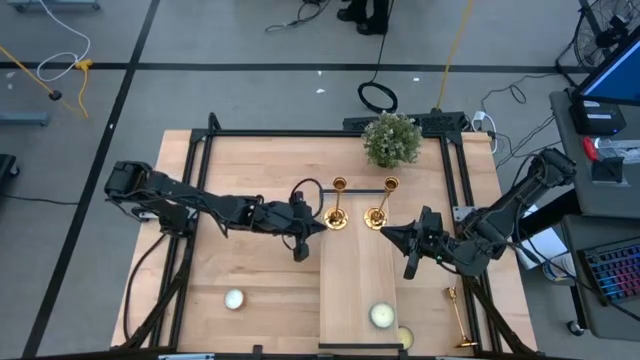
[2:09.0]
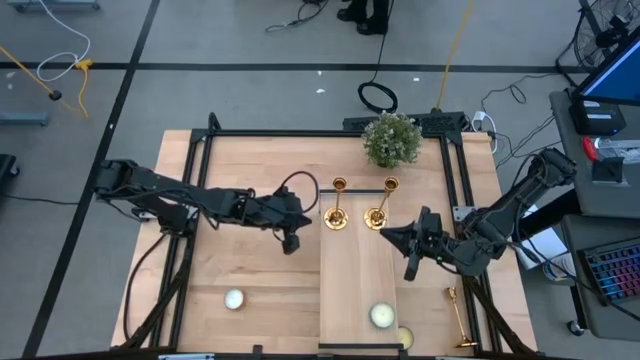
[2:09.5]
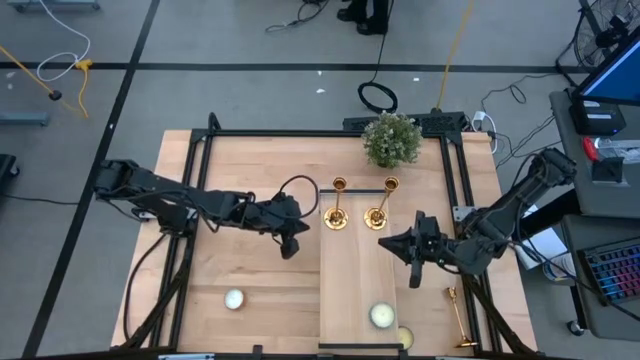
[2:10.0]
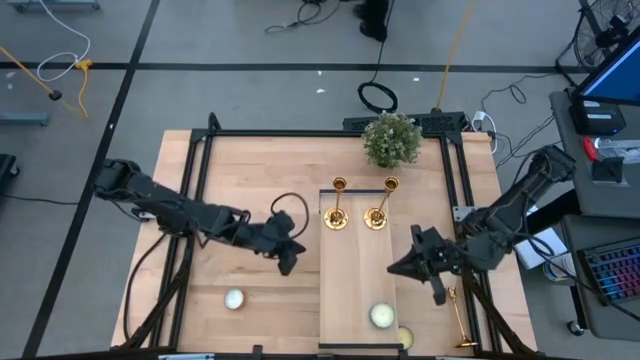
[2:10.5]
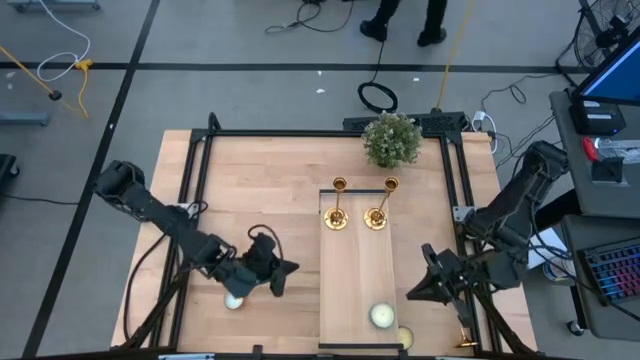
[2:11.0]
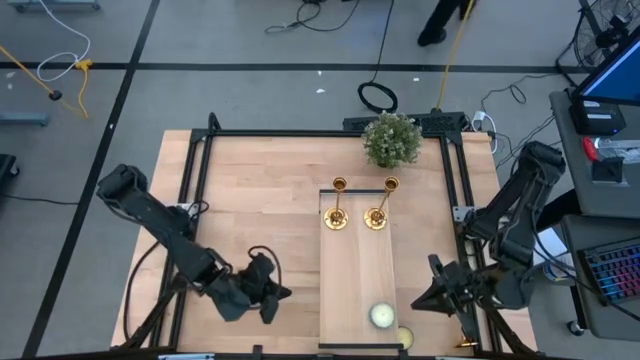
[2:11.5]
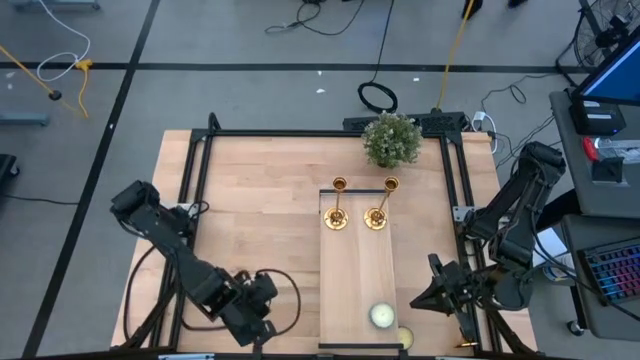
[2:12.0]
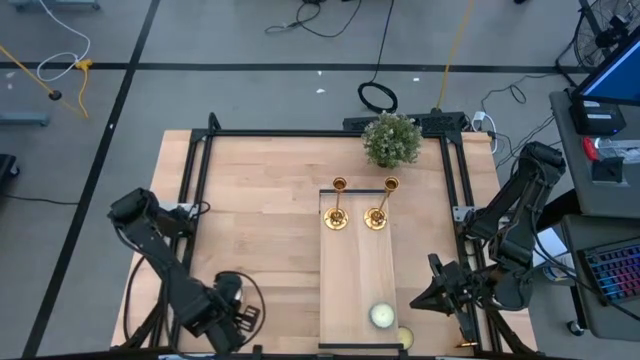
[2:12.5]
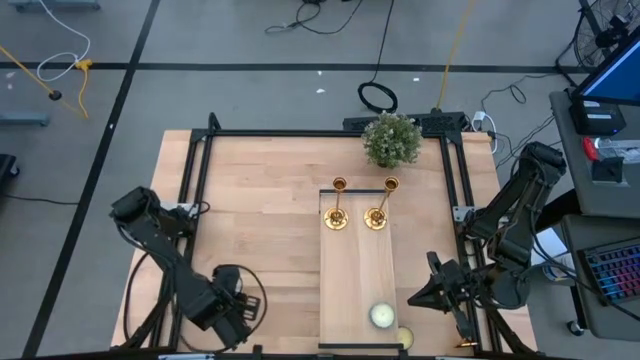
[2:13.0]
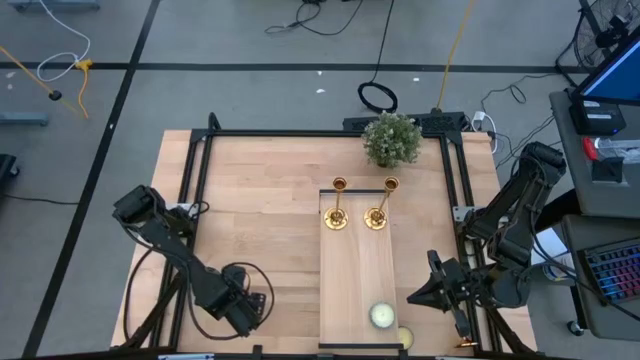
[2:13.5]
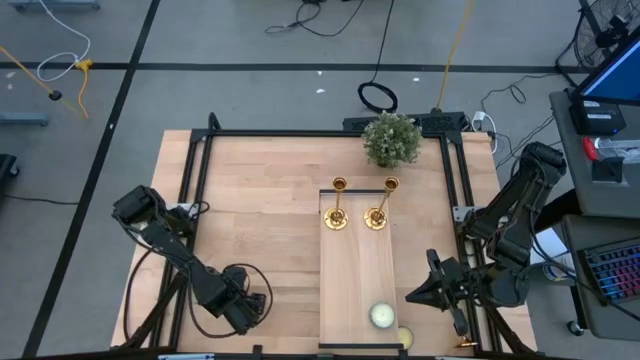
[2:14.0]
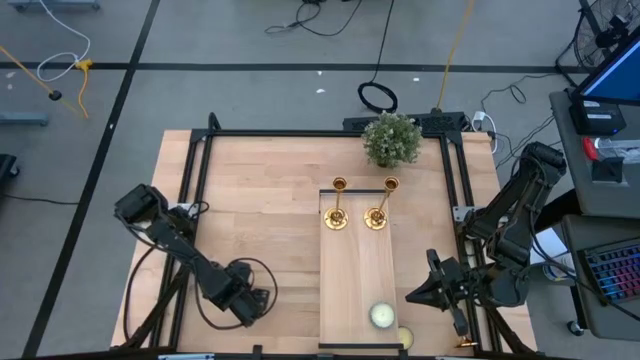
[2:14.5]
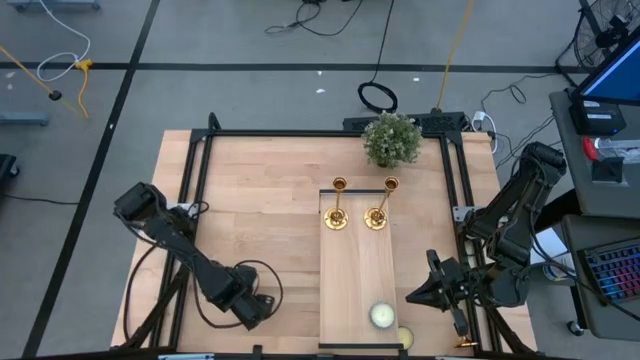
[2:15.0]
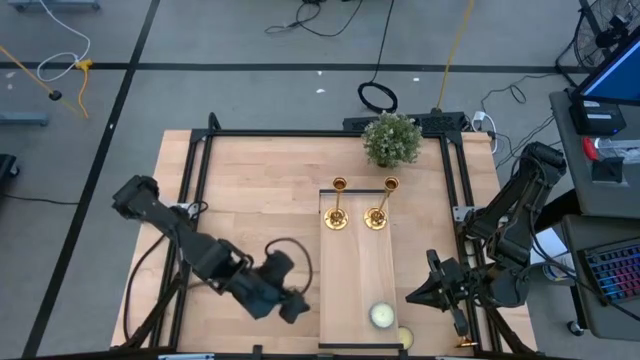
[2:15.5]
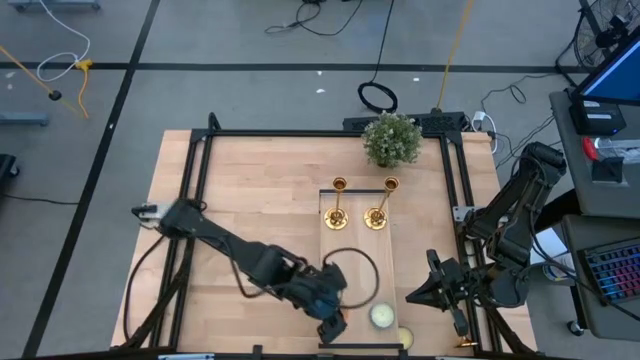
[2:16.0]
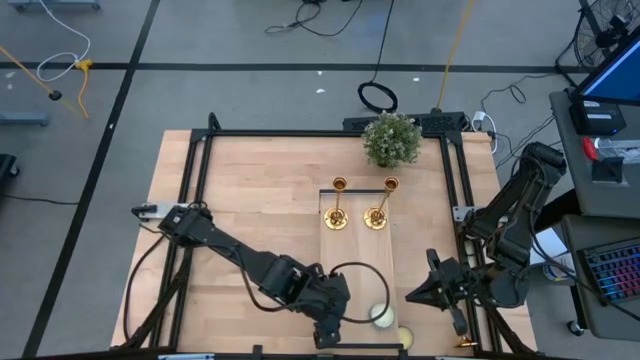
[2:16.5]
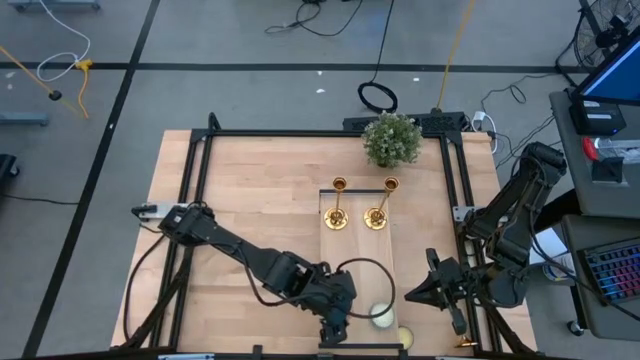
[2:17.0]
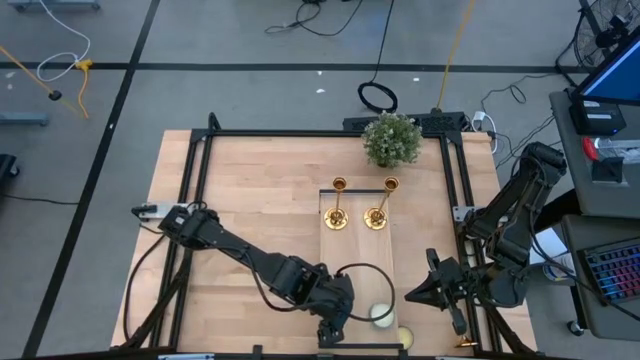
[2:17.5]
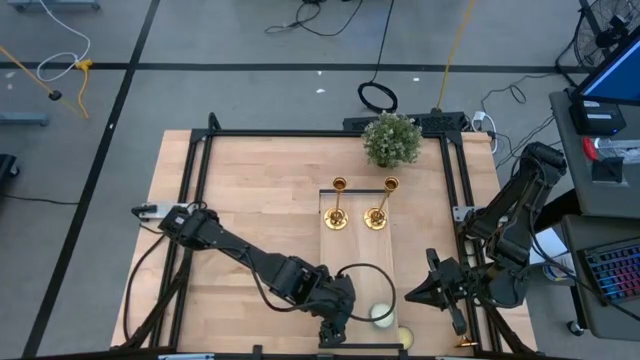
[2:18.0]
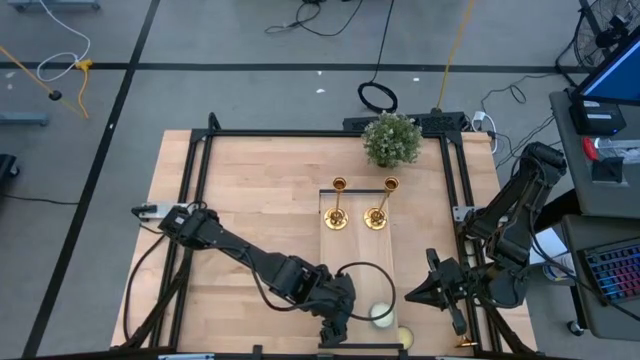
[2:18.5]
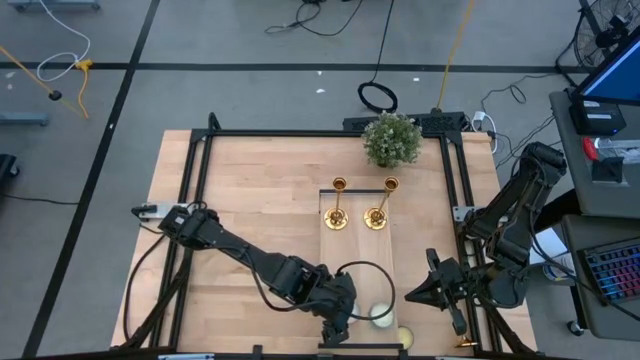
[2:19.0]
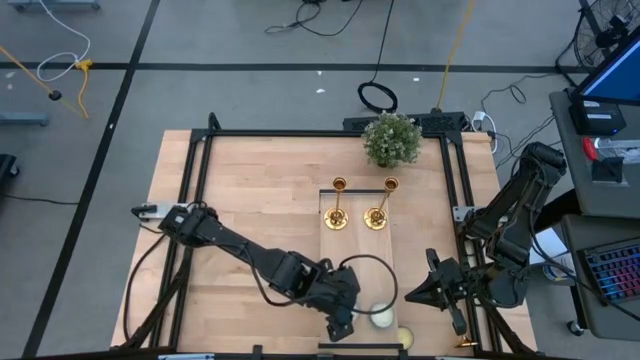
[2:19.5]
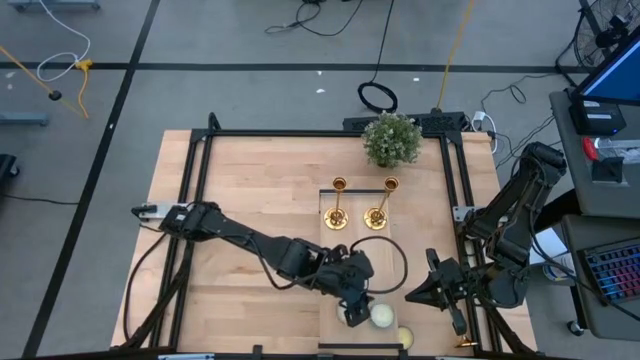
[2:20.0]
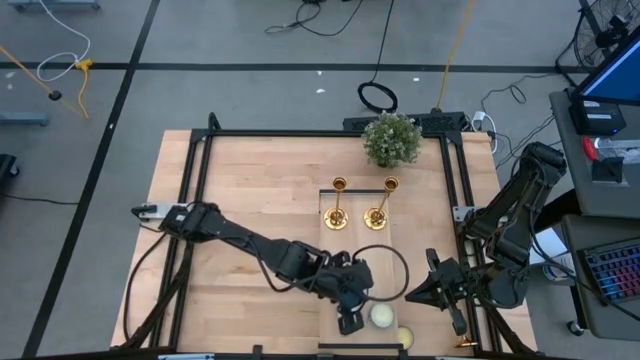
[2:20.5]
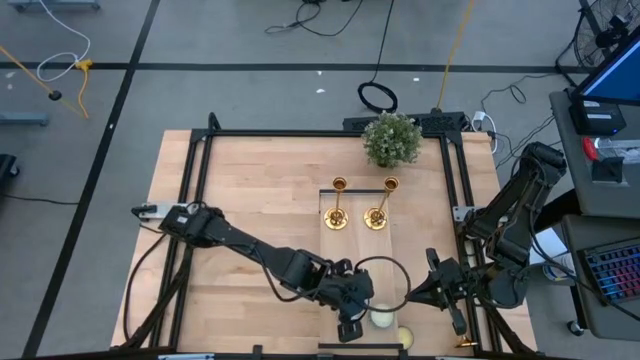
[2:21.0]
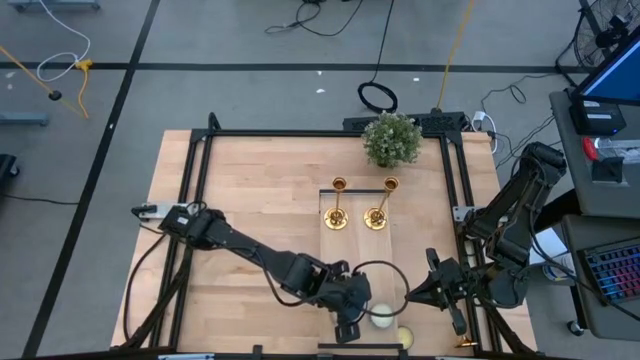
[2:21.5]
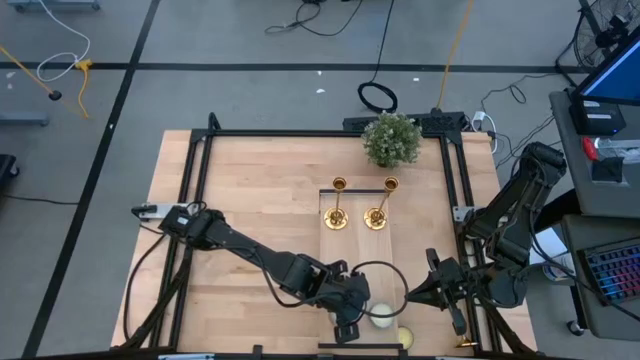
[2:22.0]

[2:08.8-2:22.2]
Task: Pick & Place candle stick holders
Put the yellow patterned scented candle on the shelf

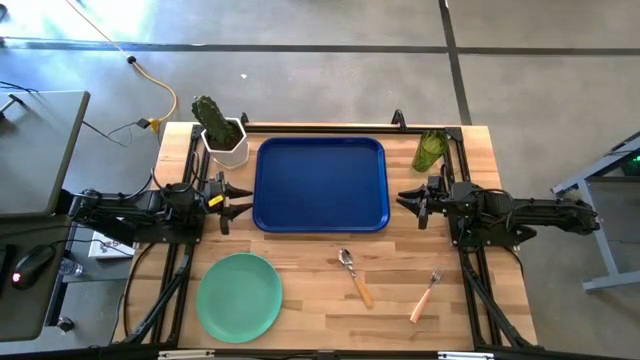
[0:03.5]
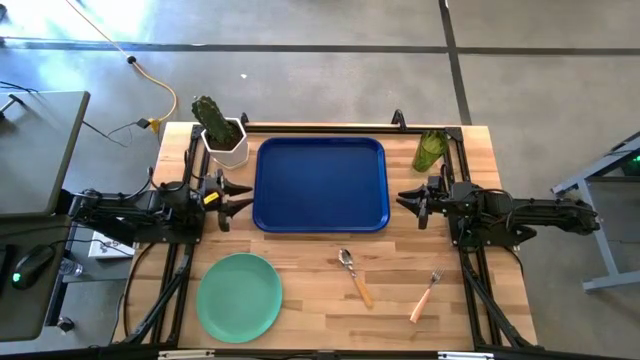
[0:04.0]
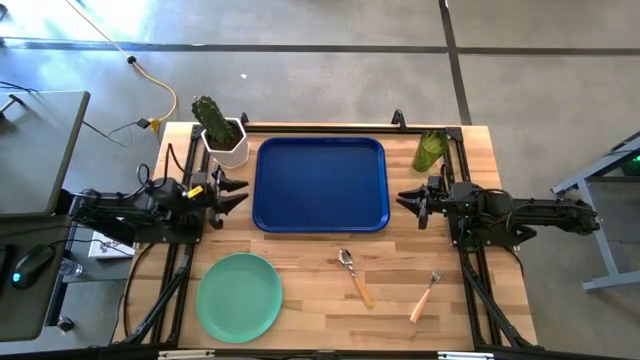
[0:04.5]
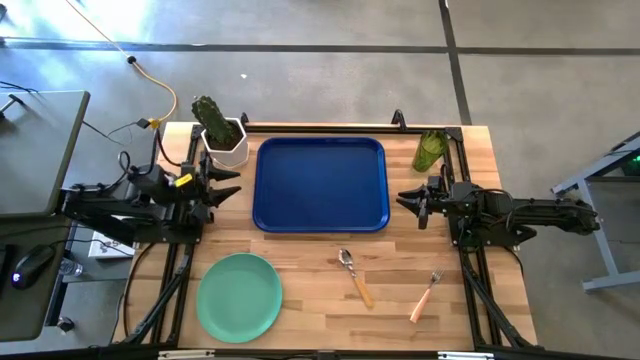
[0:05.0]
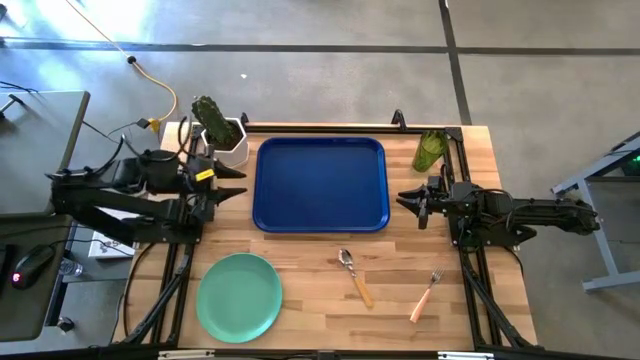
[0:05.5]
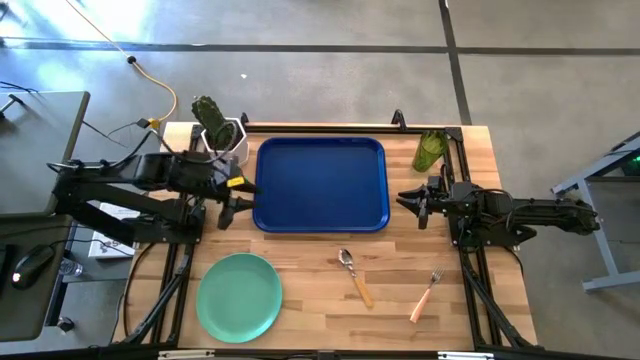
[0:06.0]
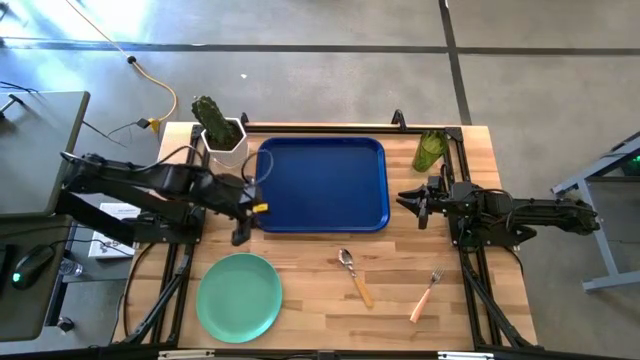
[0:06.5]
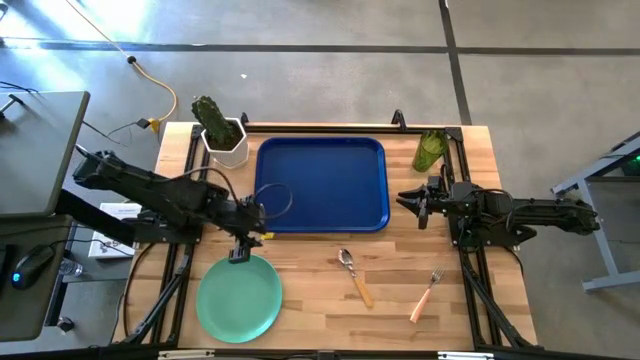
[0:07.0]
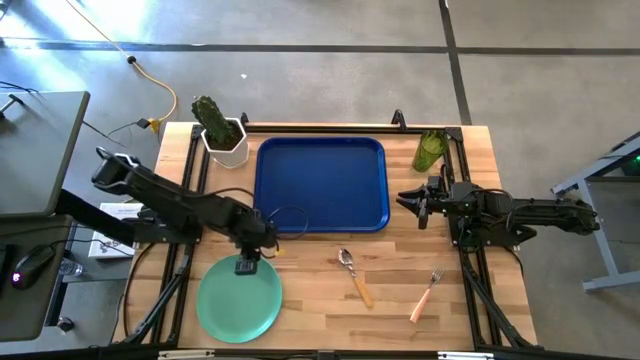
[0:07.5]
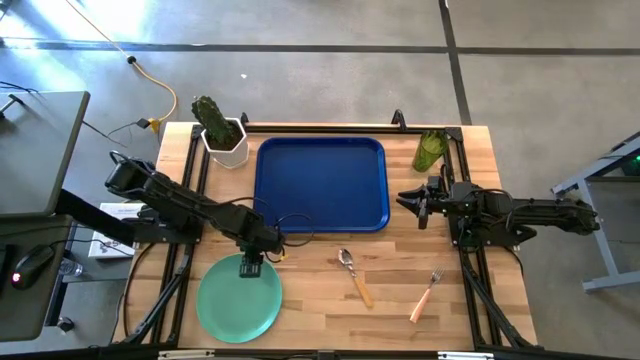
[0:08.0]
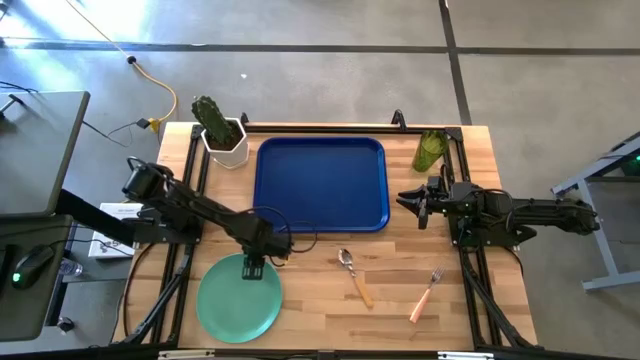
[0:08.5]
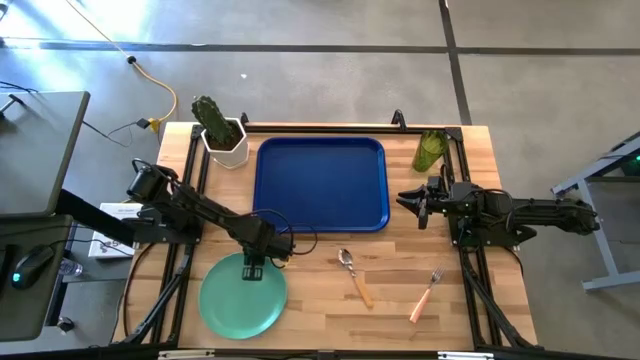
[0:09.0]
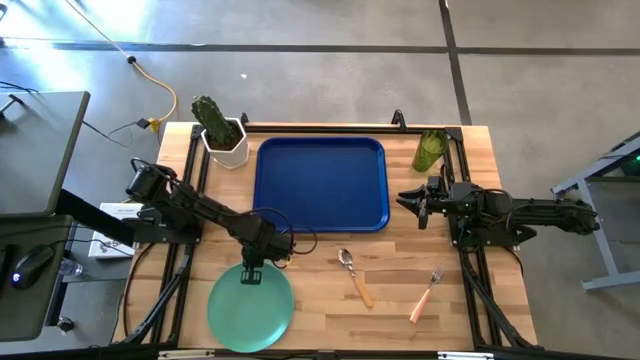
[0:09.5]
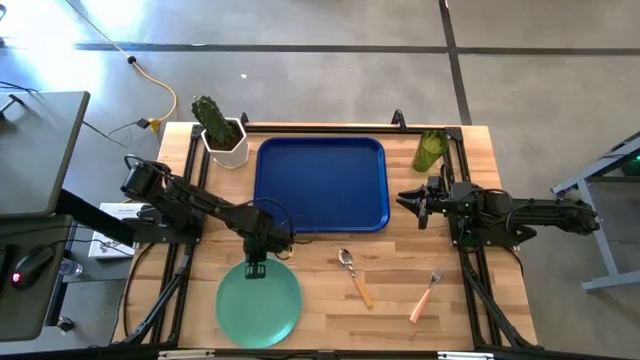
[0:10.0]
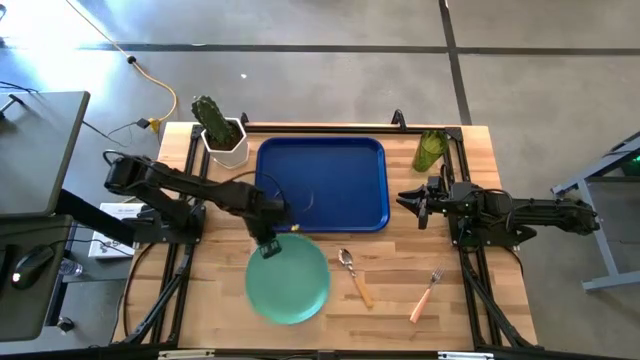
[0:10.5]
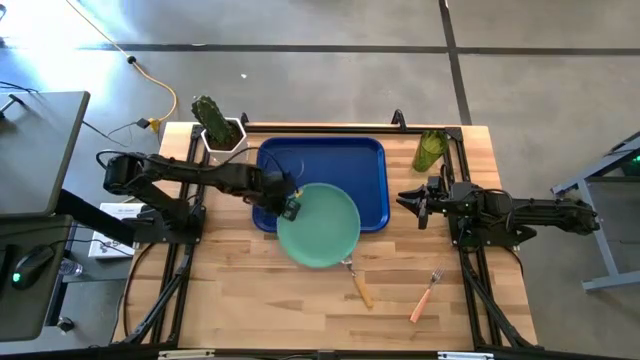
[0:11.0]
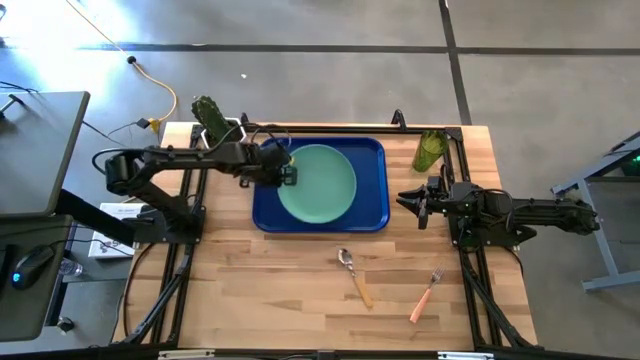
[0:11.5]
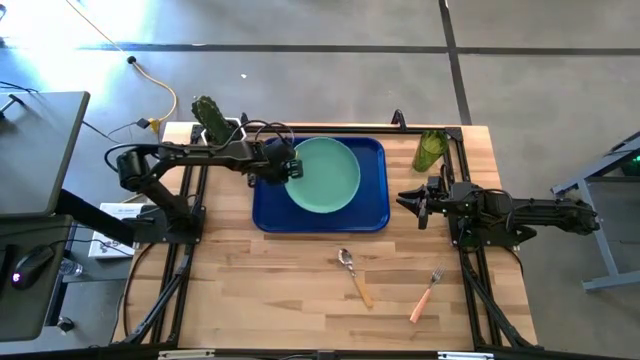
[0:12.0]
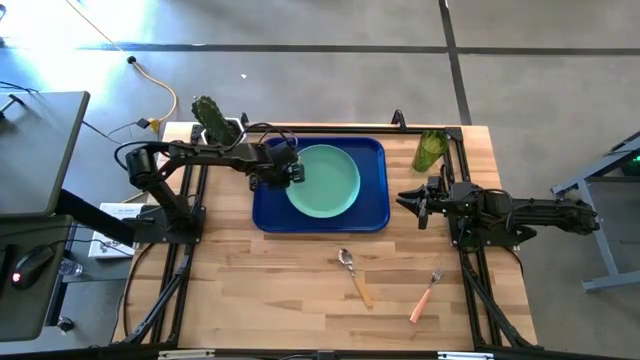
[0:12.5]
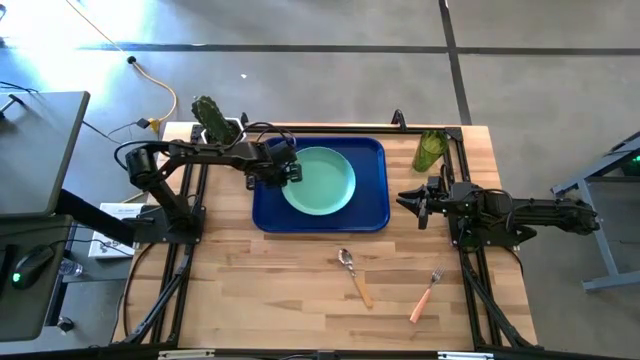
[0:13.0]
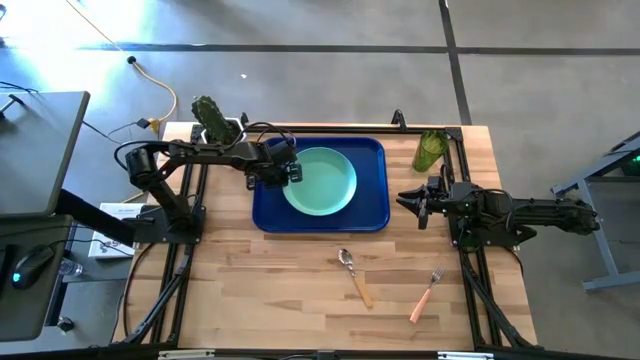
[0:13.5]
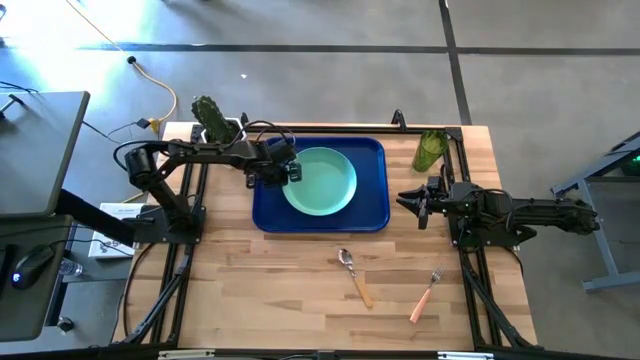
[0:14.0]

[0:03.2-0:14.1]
Task: Pick and place plate/cup/fork/spoon on tray
Put the green plate on the blue tray
